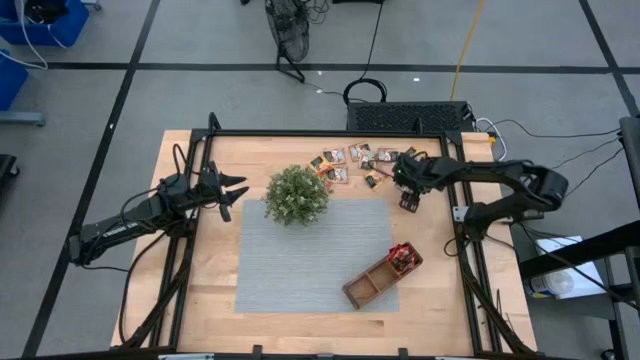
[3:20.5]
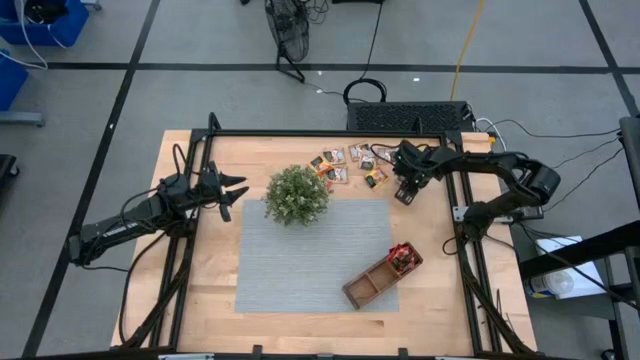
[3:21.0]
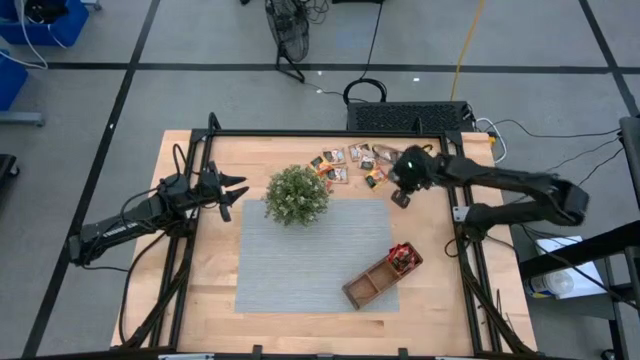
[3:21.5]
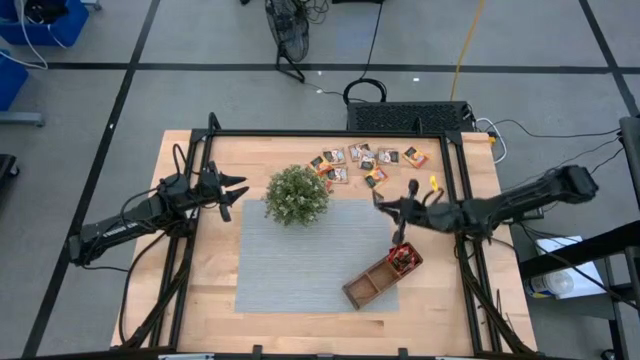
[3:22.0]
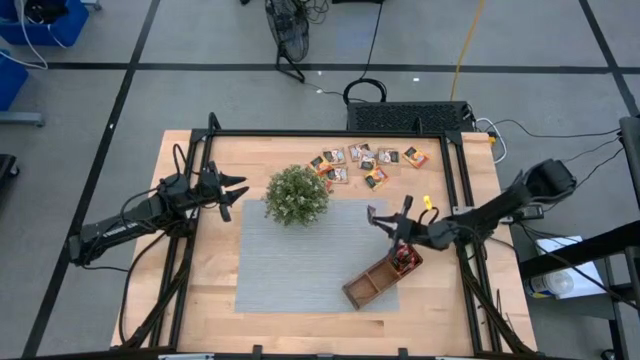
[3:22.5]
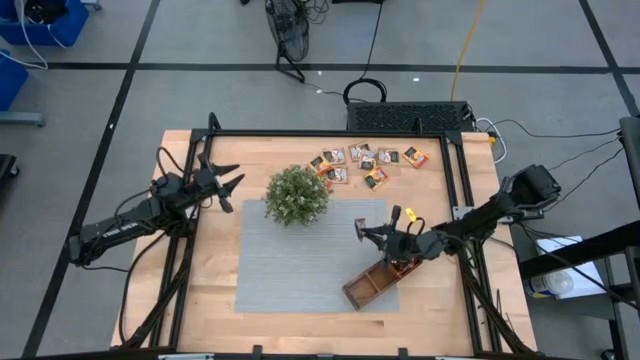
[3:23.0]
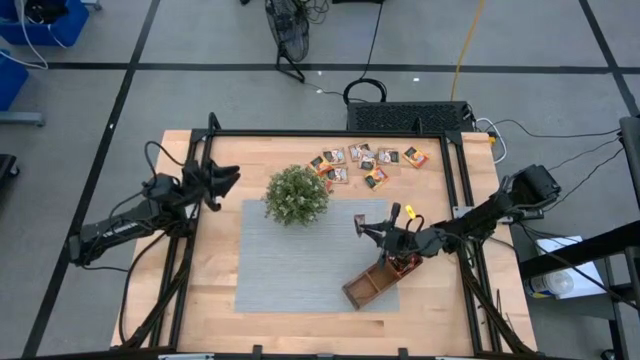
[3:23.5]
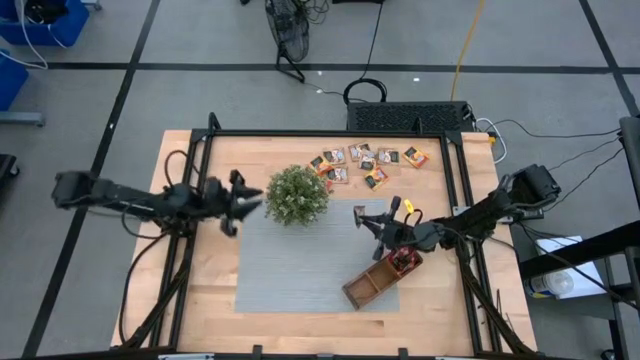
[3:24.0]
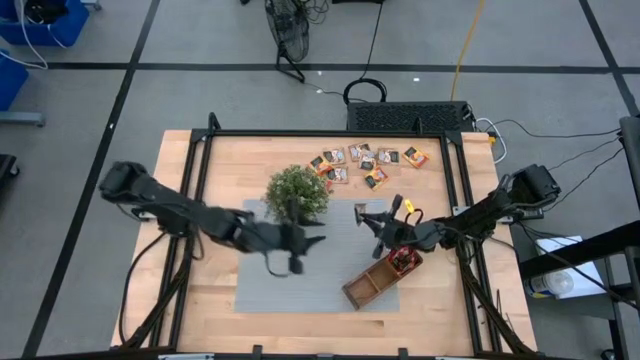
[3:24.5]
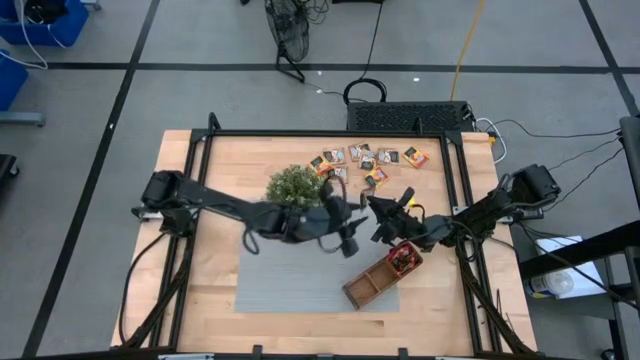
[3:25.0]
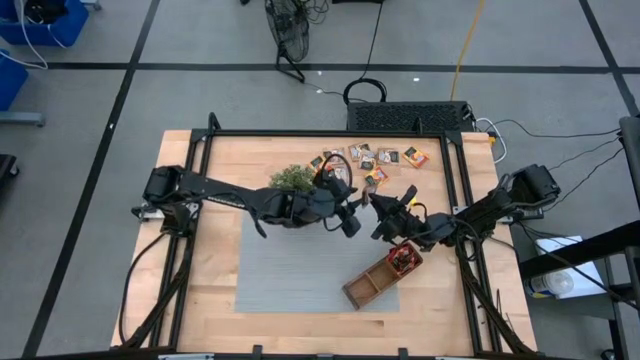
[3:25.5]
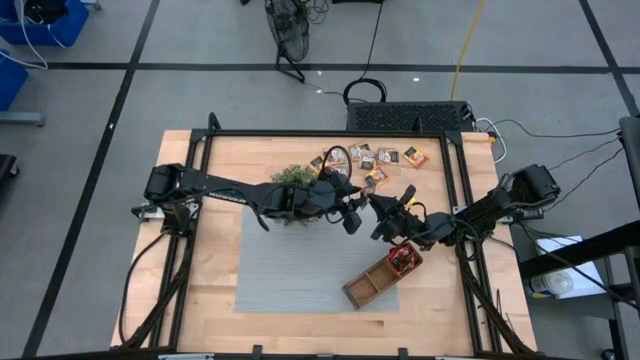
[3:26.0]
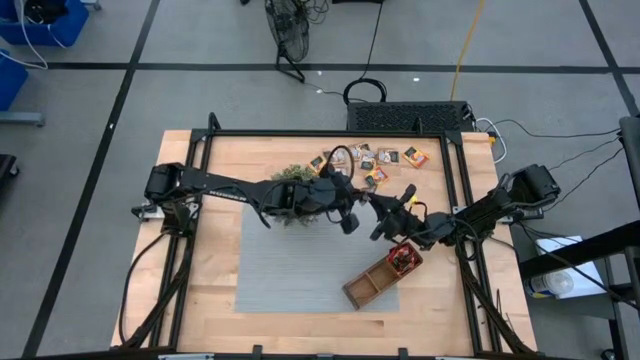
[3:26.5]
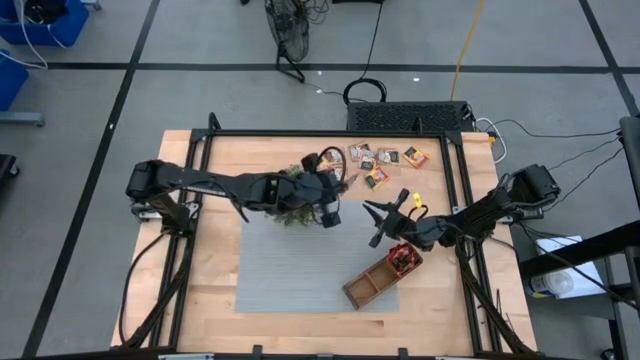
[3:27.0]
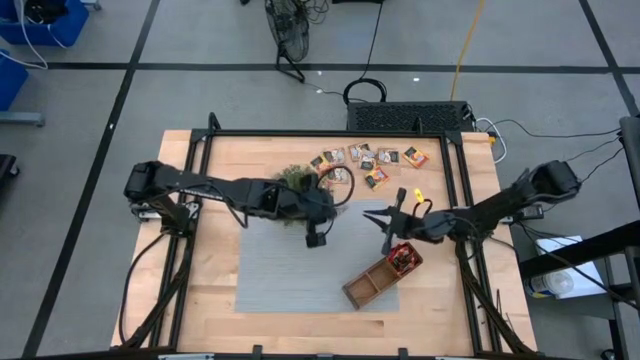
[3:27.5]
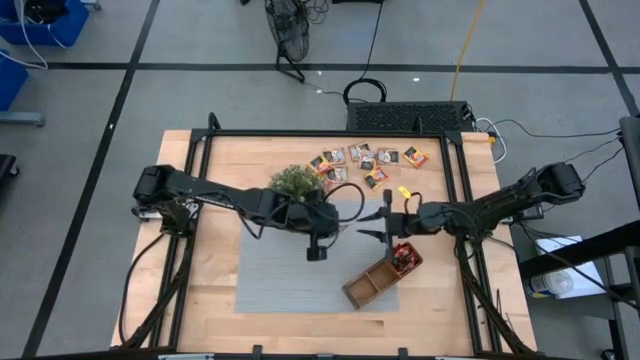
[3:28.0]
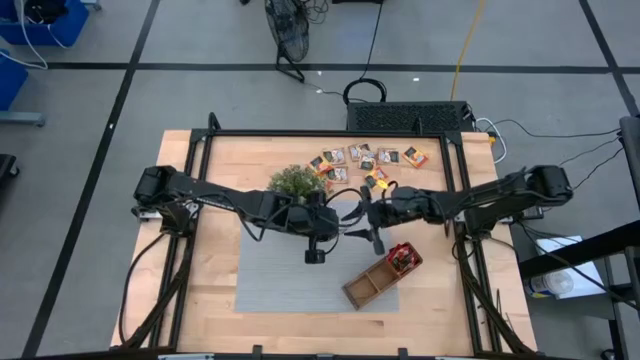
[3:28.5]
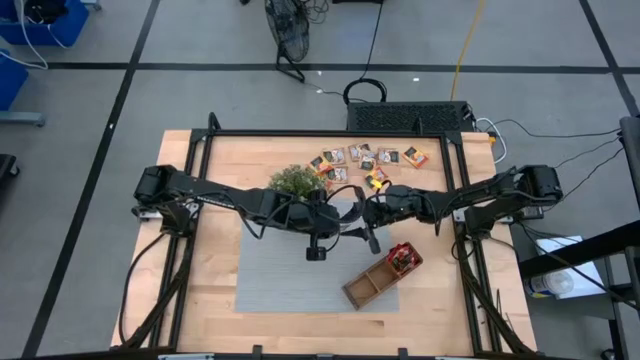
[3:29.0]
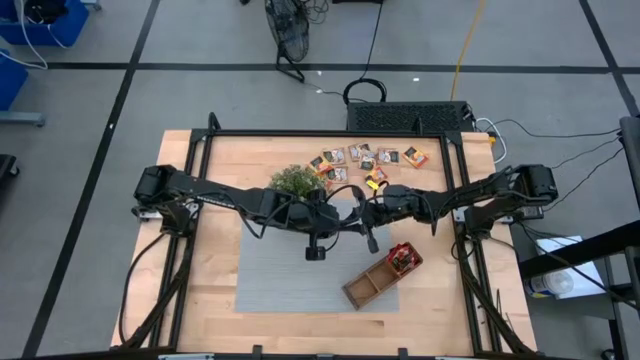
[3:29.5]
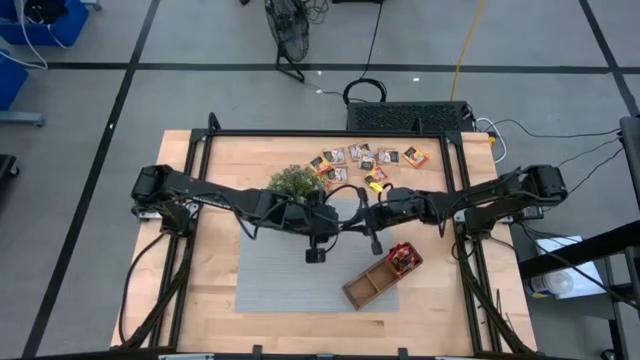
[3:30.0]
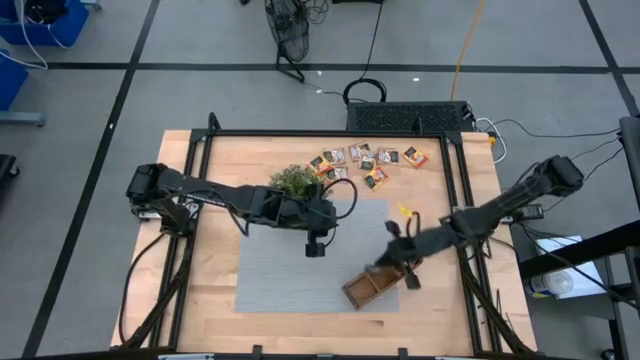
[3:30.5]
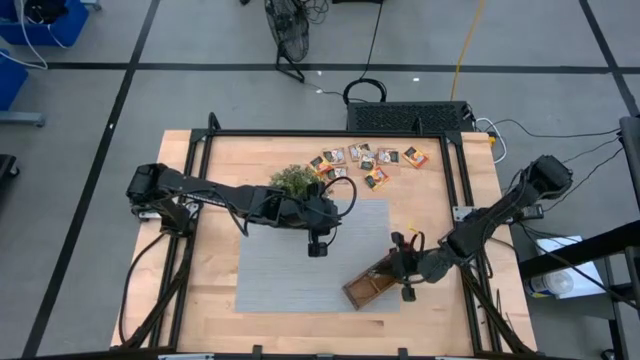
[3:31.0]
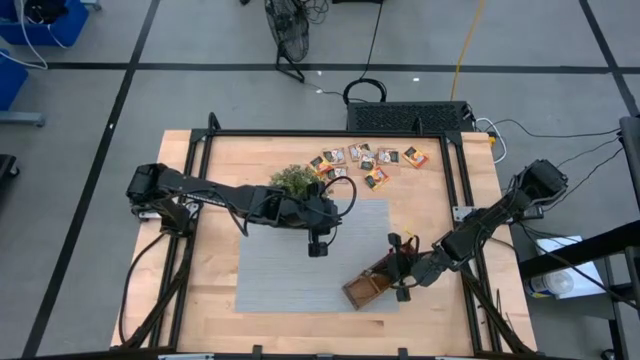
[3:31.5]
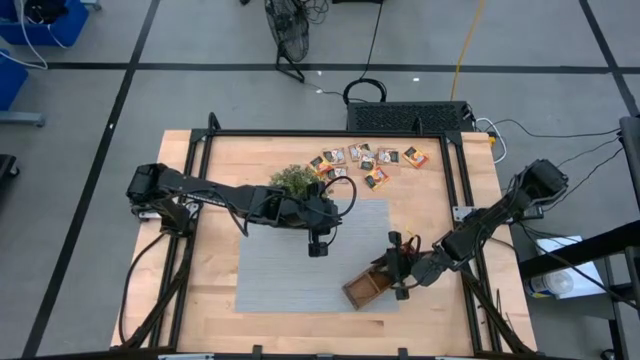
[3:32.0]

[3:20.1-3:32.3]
Task: Pick & Place Tea
Put the apple tea sachet into the brown organizer

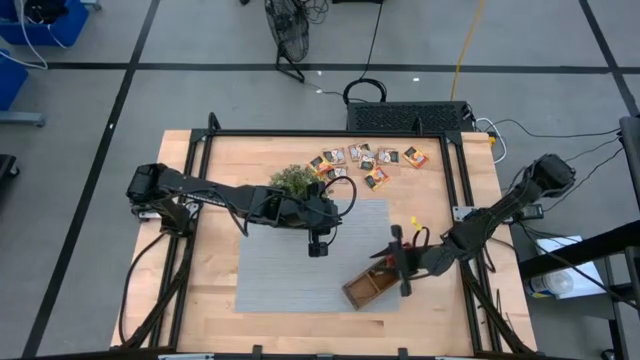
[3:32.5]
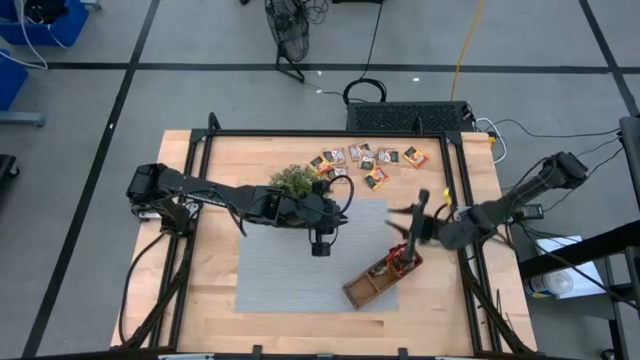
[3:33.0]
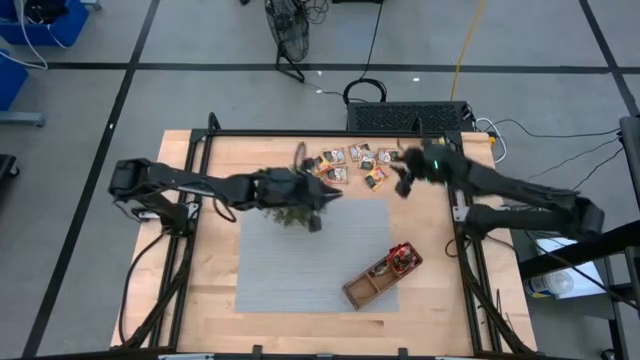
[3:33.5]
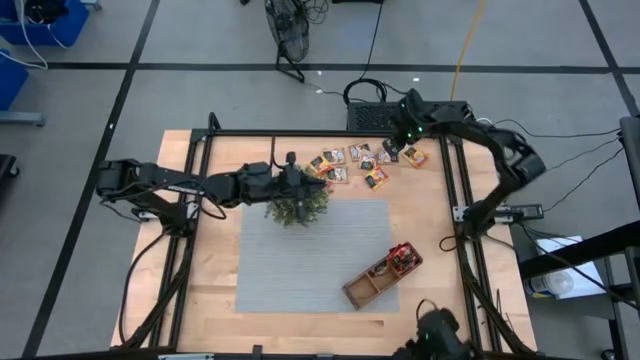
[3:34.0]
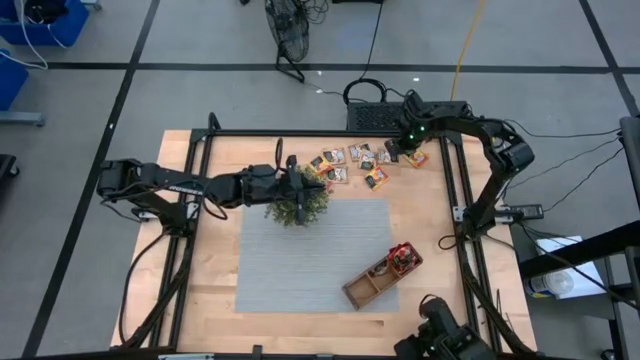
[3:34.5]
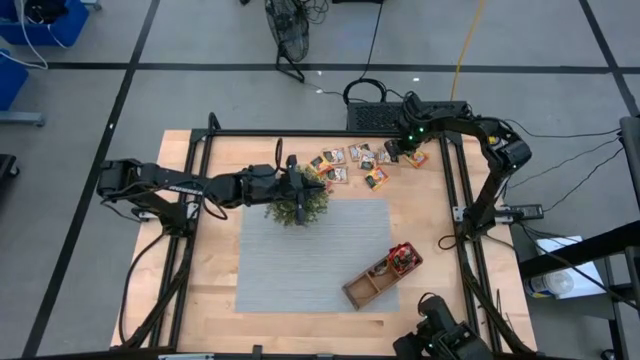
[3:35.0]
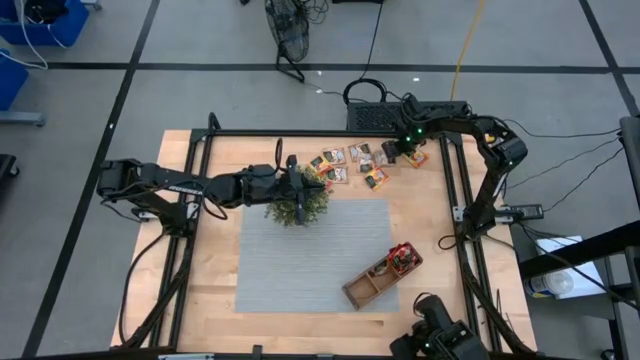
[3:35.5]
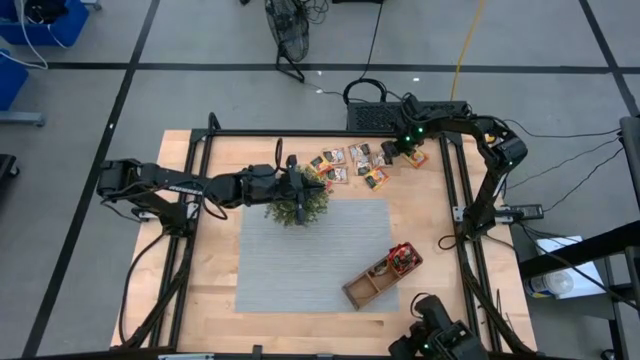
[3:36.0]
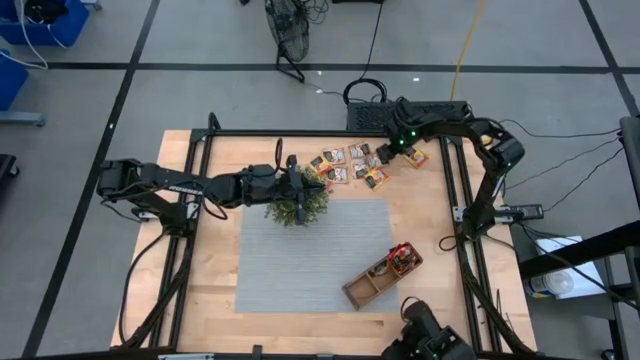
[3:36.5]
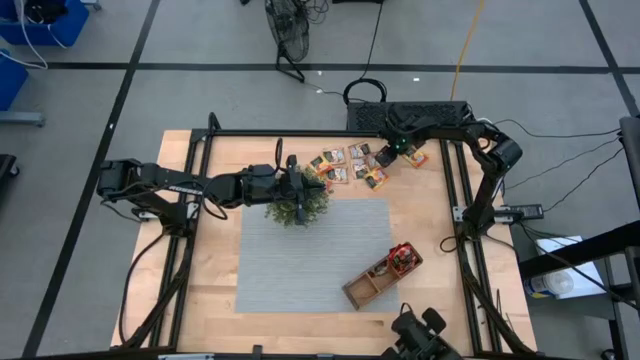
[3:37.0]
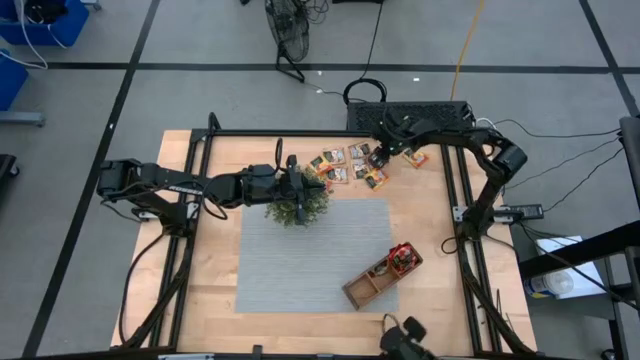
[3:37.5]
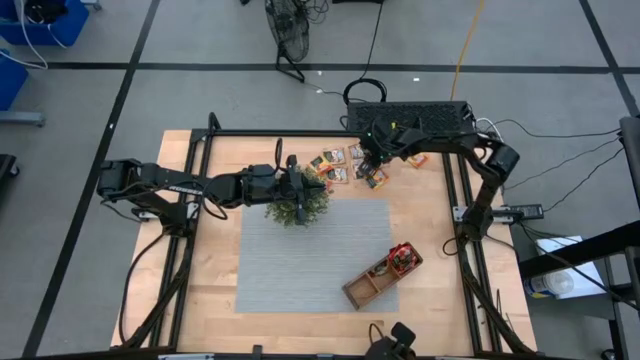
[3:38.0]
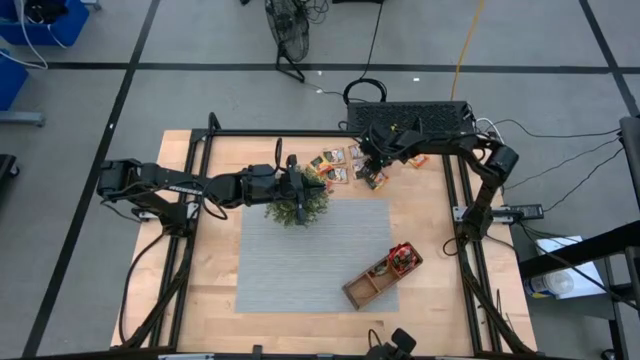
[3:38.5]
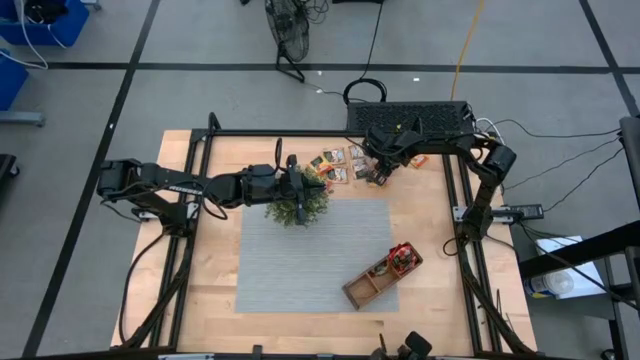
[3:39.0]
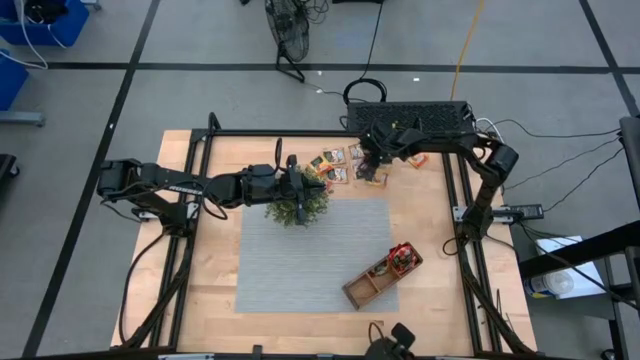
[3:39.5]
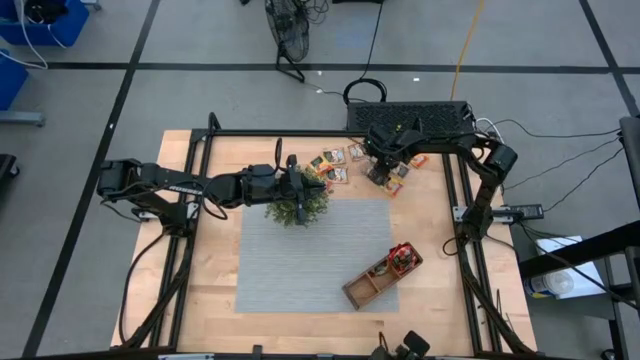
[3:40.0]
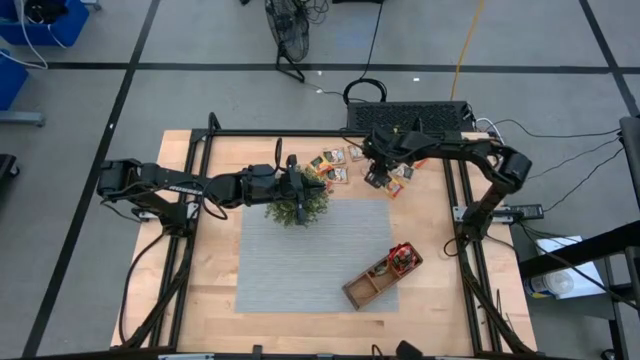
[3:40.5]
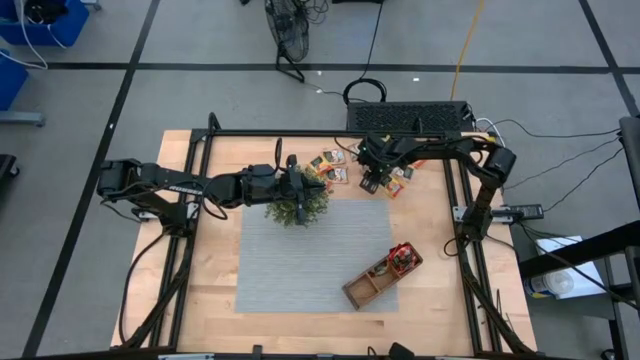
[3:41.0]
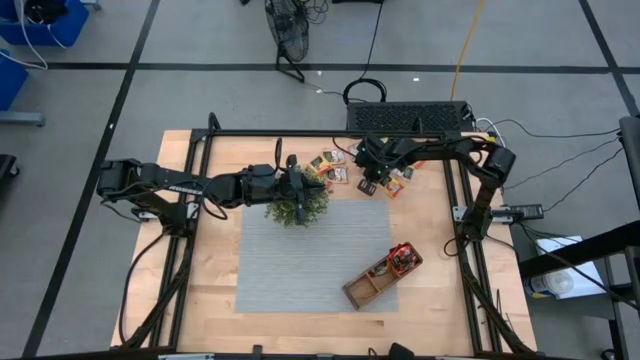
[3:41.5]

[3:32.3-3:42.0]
Put the apple tea sachet into the brown organizer
